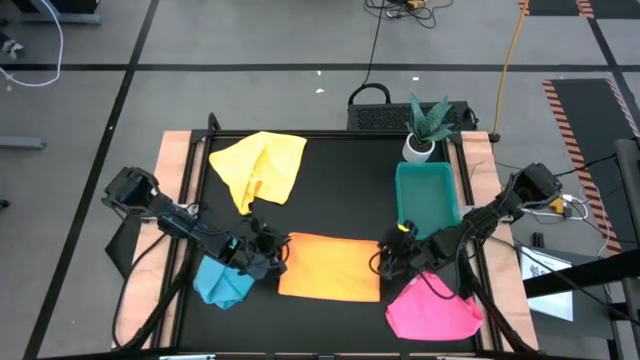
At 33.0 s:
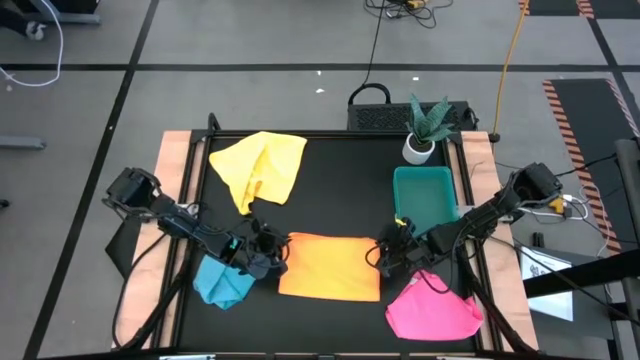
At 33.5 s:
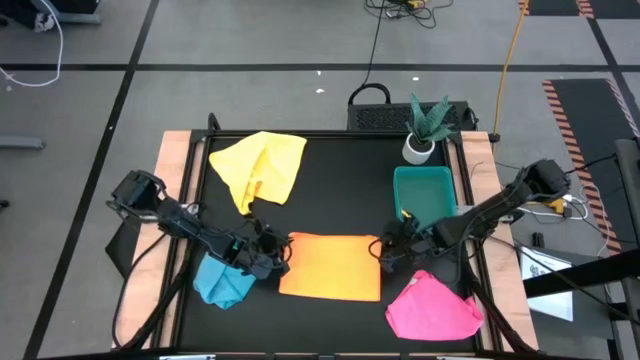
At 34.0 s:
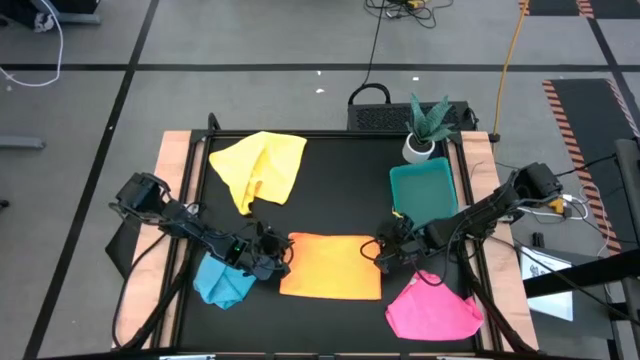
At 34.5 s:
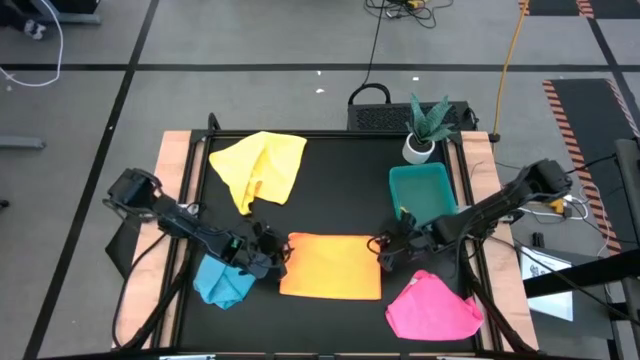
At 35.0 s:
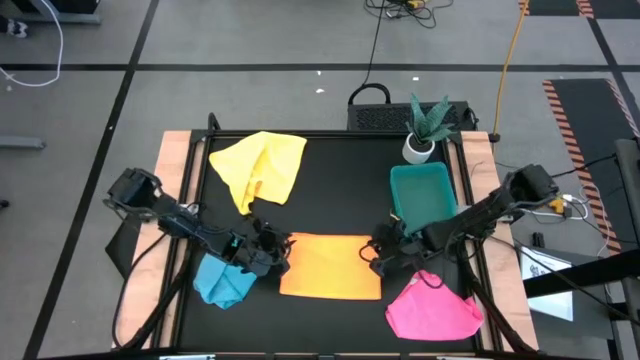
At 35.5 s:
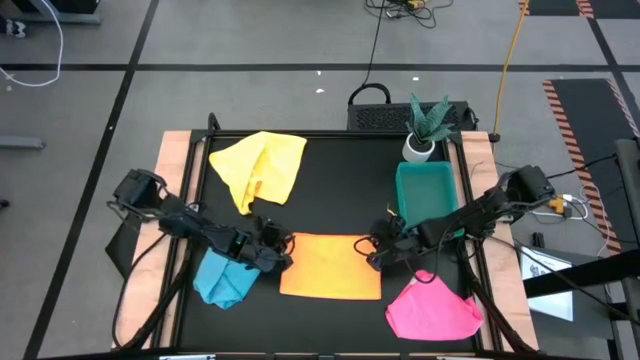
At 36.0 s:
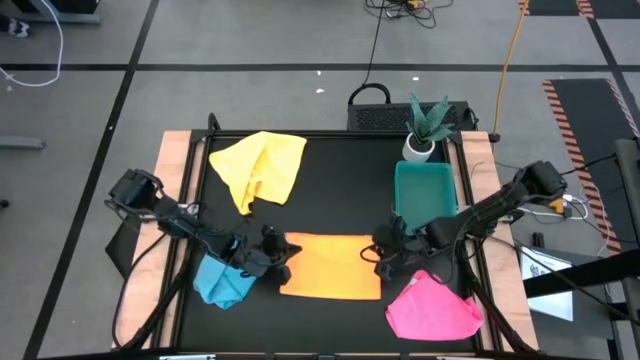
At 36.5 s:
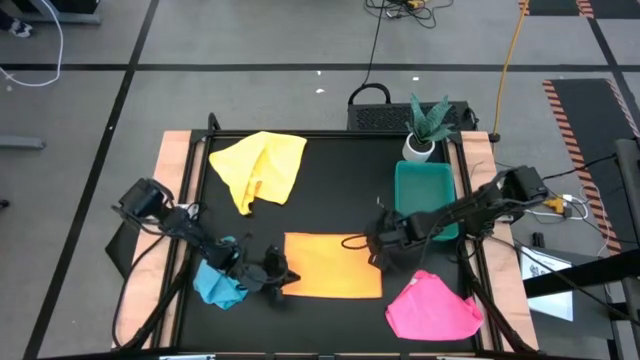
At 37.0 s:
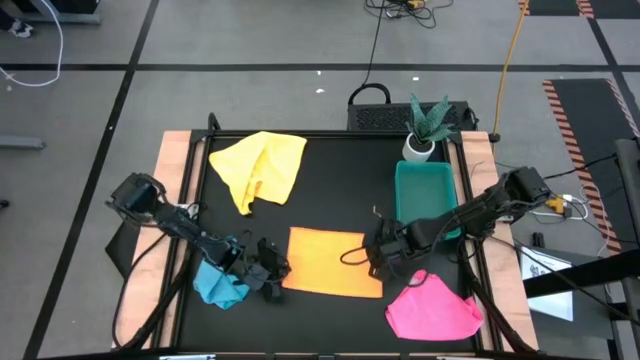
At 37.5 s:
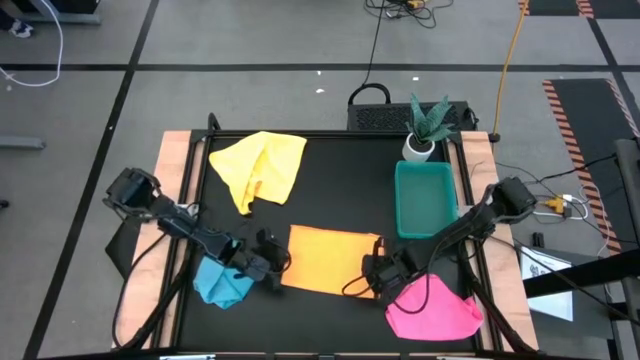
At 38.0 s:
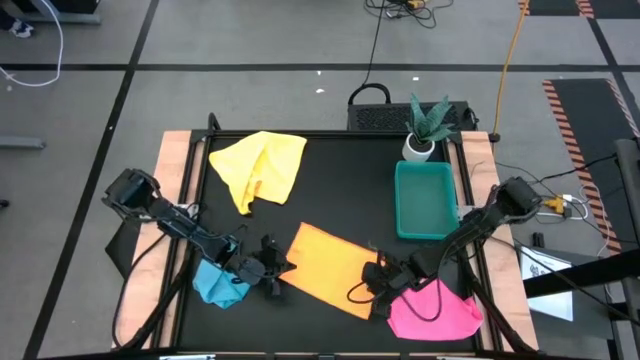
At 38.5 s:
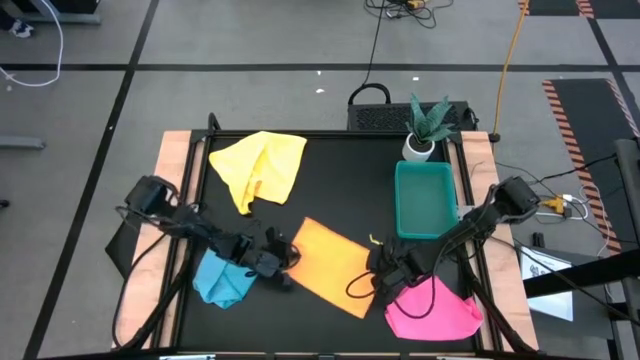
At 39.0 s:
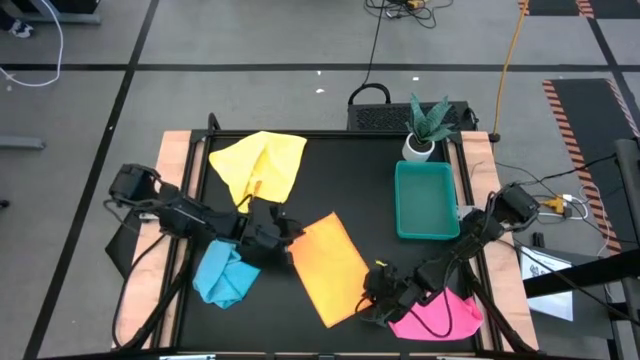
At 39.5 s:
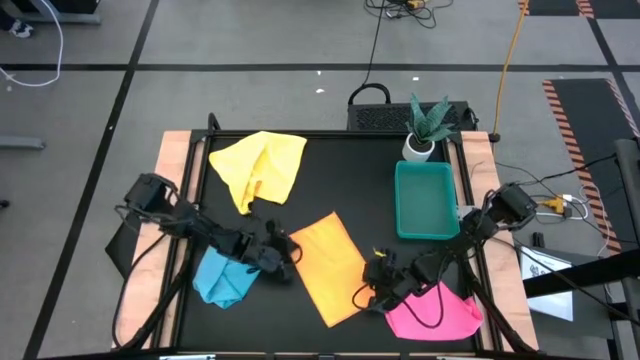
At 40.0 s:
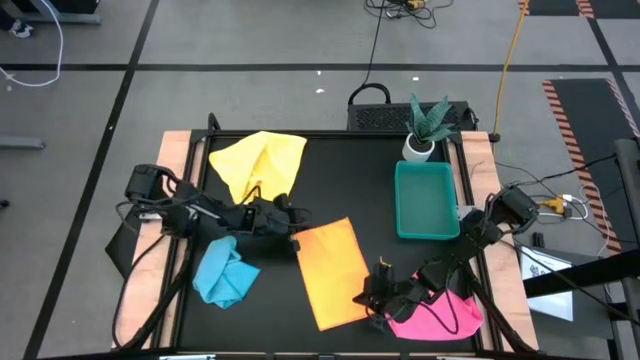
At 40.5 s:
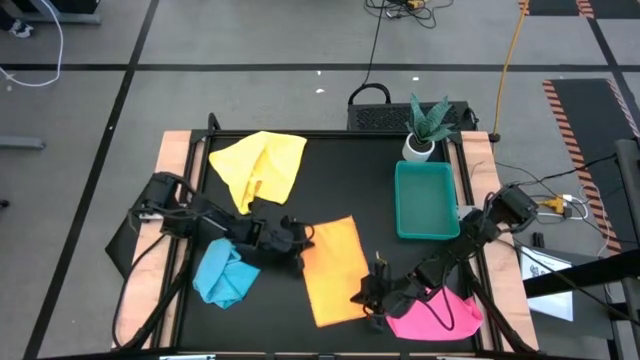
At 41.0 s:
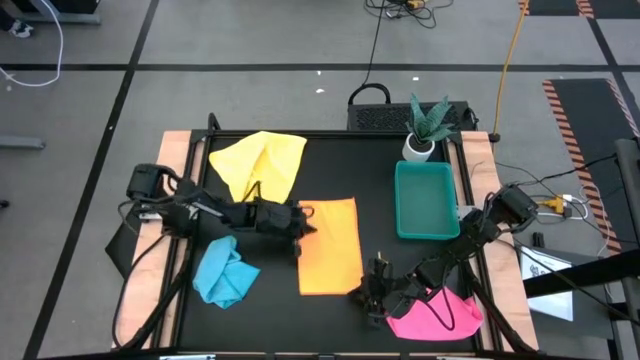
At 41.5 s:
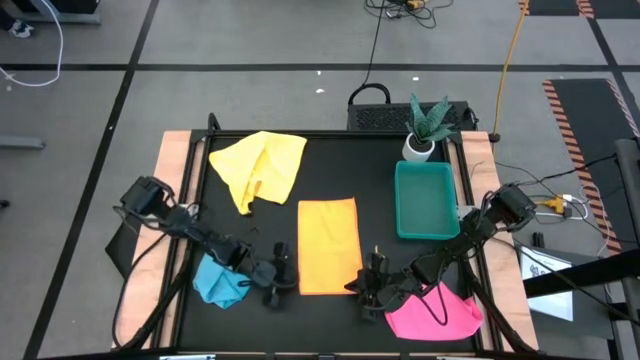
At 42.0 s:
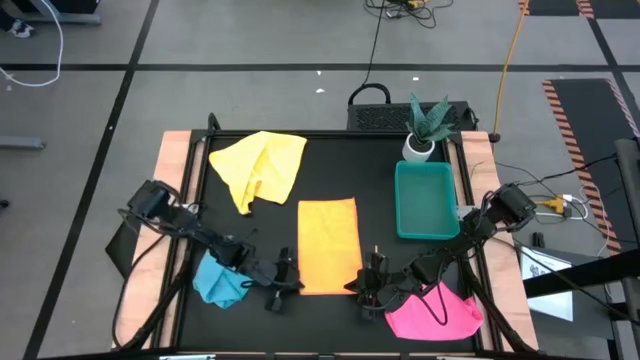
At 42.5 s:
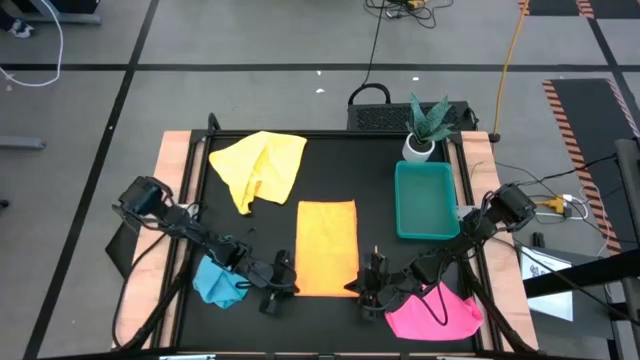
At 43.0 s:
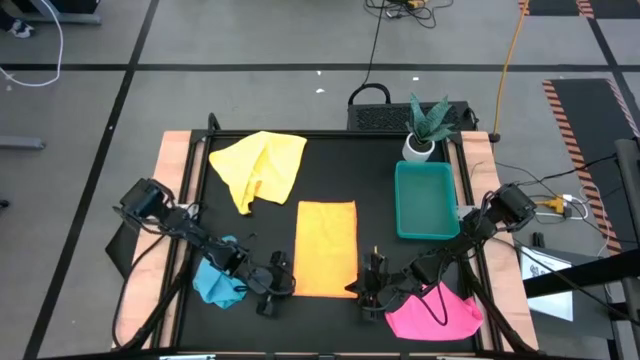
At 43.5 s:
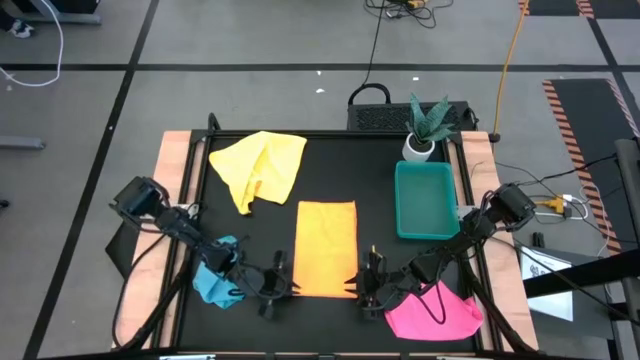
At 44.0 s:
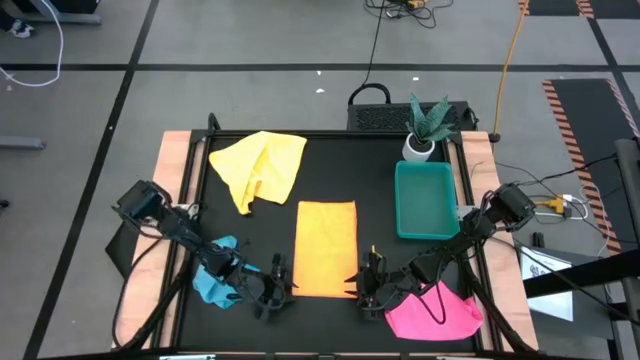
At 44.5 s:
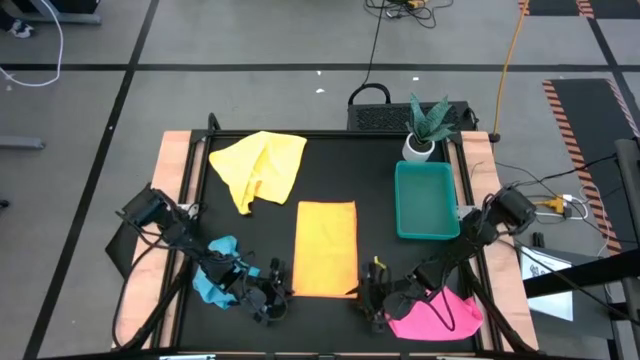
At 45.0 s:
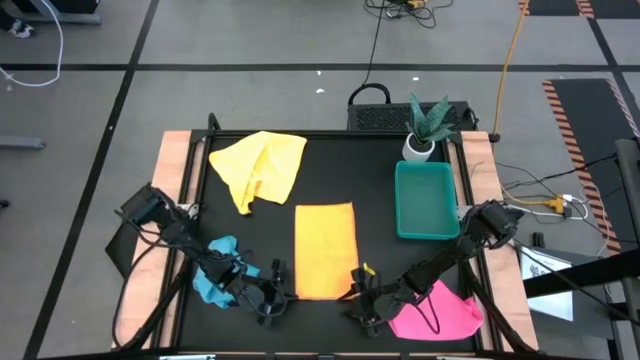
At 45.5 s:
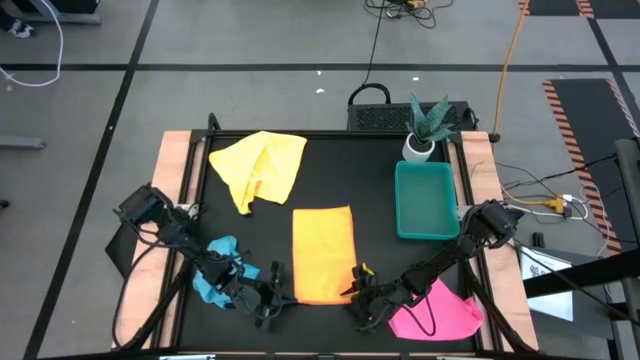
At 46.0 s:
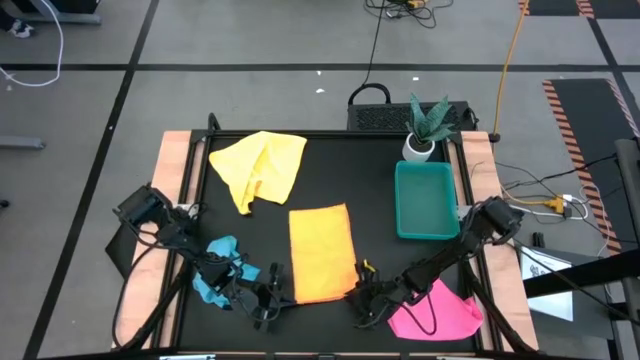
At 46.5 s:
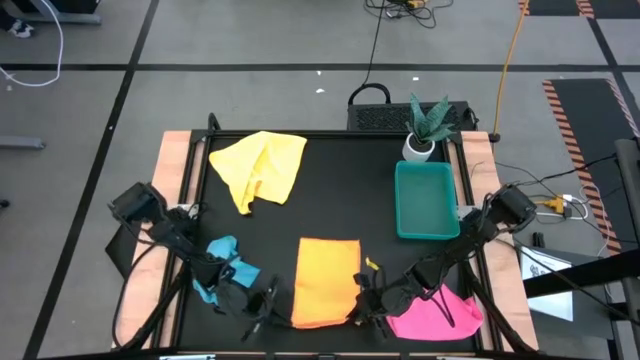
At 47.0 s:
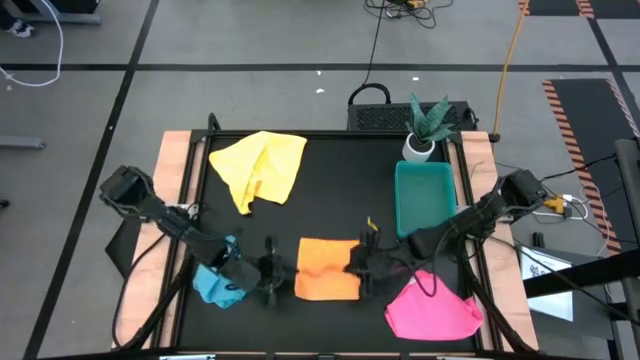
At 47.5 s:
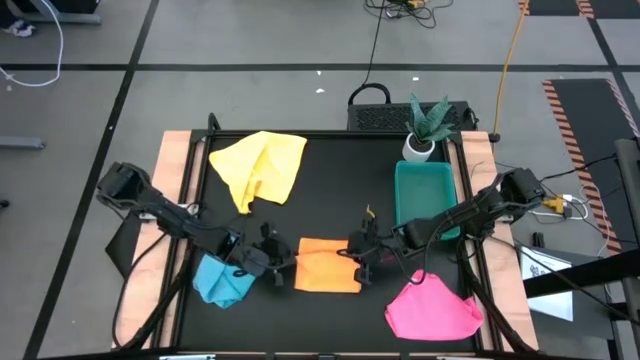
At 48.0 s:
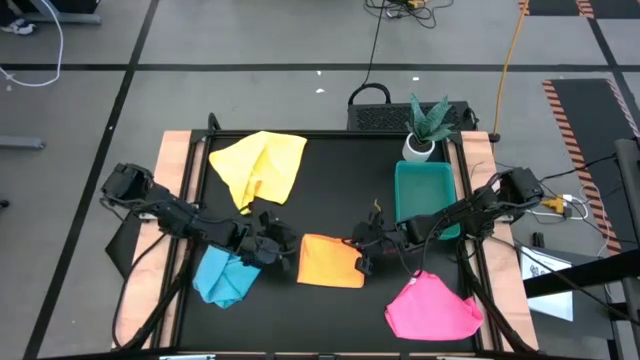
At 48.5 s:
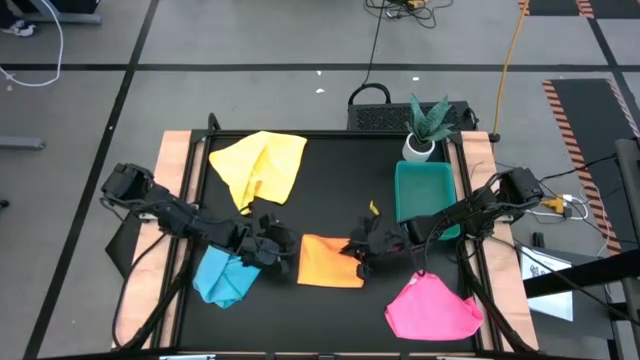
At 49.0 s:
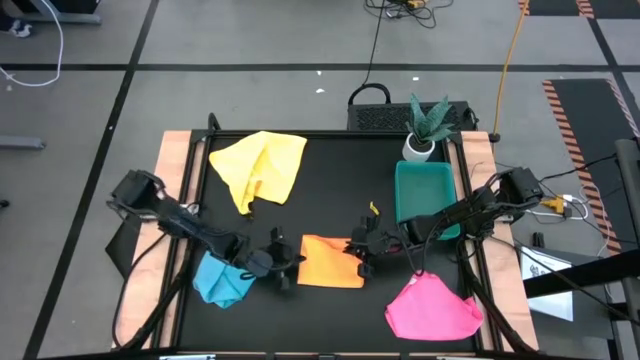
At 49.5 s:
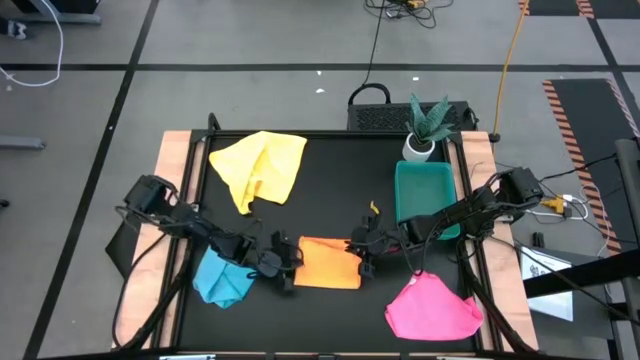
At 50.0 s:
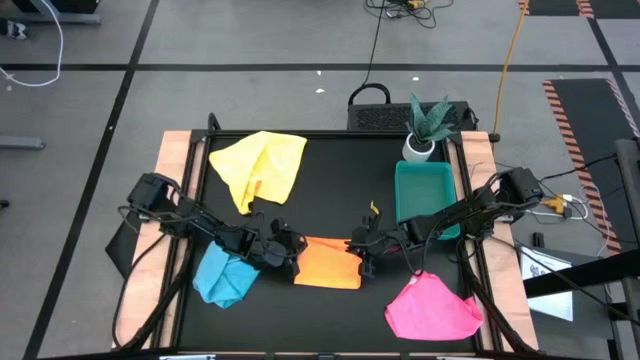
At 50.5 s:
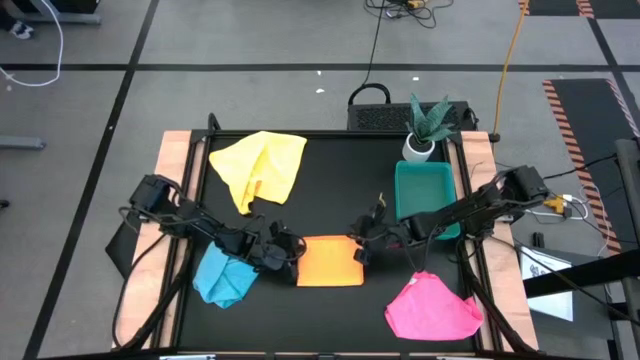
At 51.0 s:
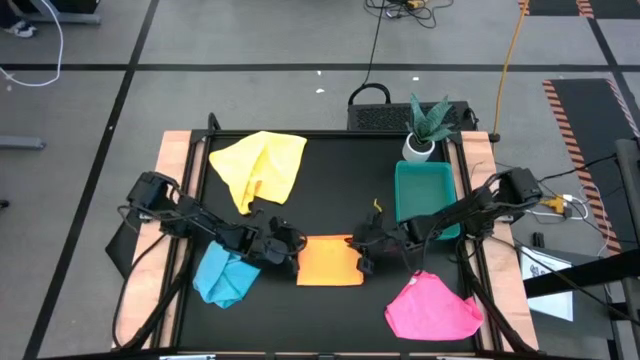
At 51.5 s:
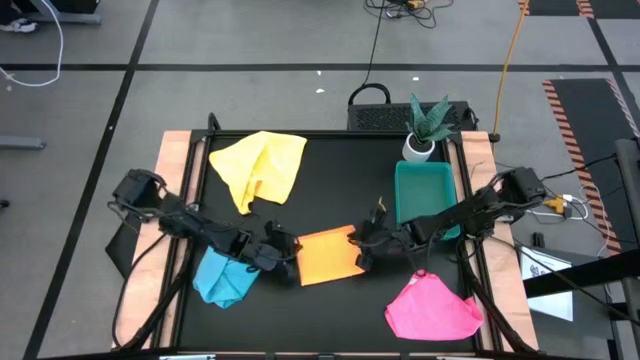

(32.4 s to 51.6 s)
Task: Fold microfiber towels
Fold the orange microfiber cloth

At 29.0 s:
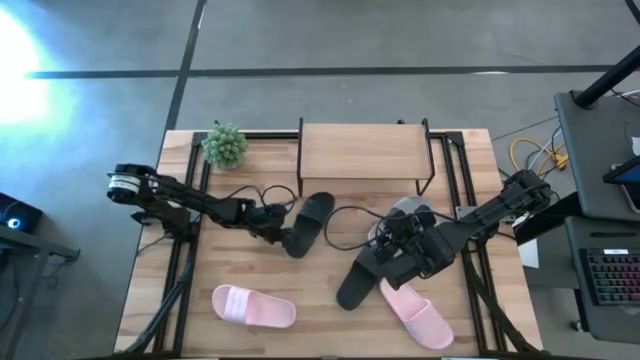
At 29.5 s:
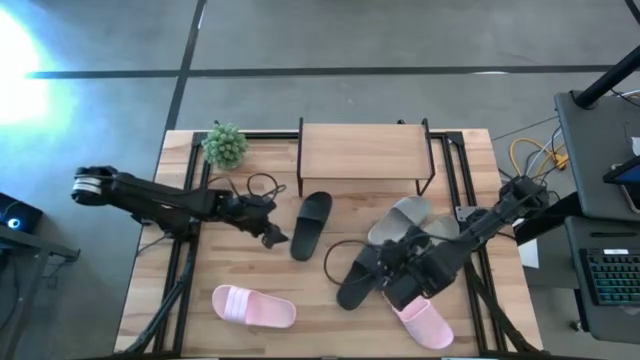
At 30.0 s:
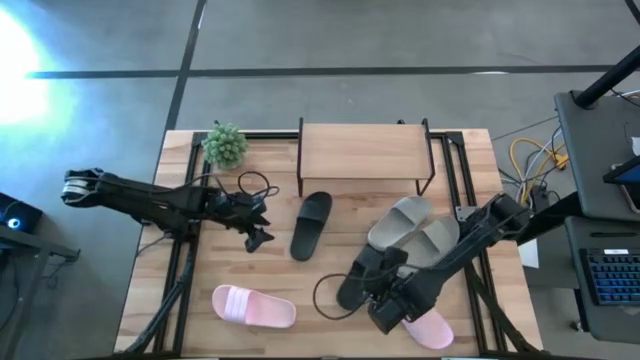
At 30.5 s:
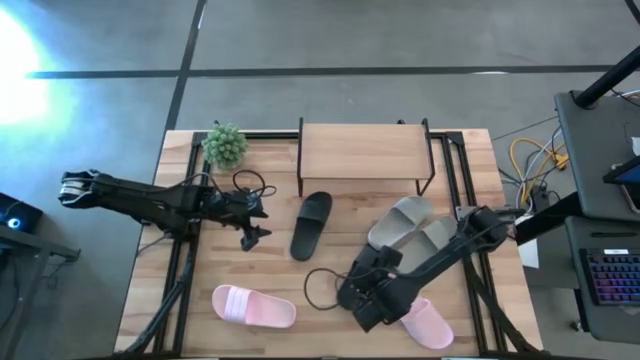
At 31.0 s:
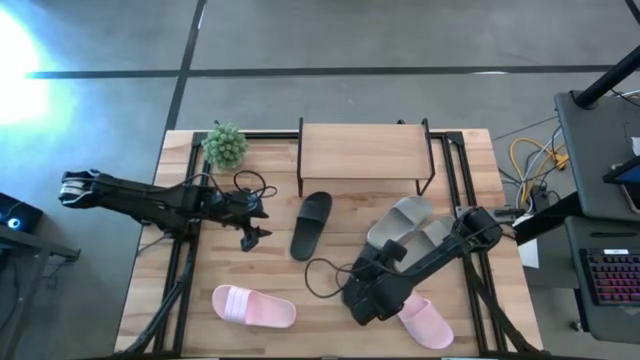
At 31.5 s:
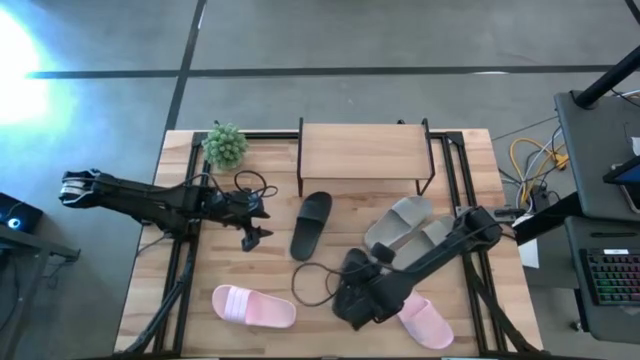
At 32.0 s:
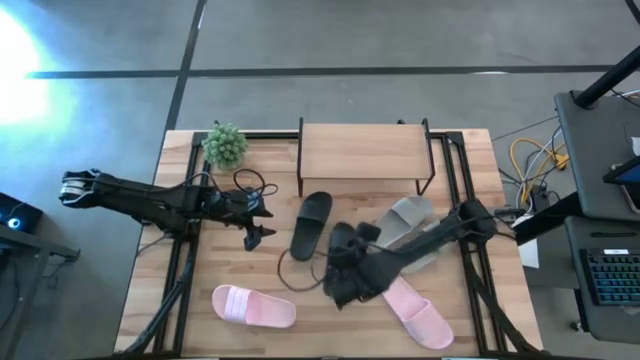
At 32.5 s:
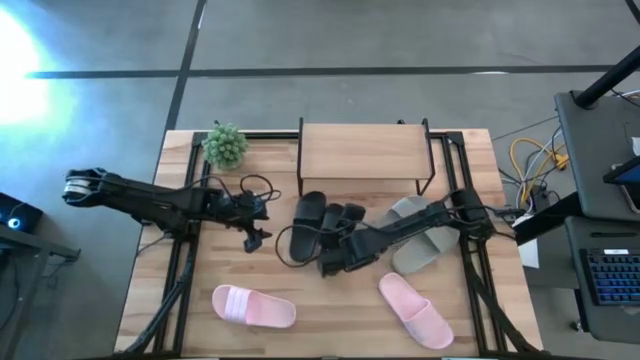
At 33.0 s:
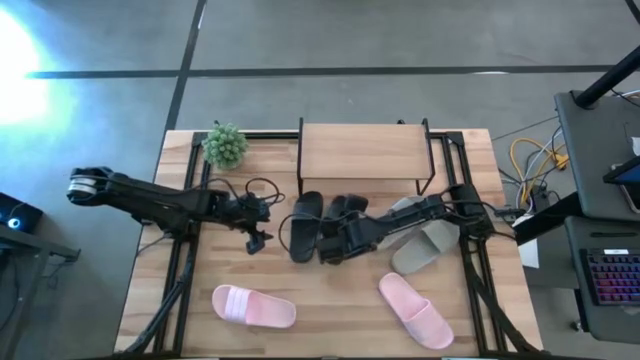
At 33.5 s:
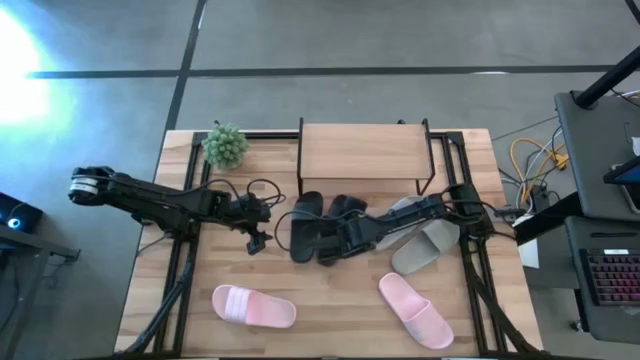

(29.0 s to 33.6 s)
Task: Pick and place slides into the shelf
Move the right black slipper to the center of the table
